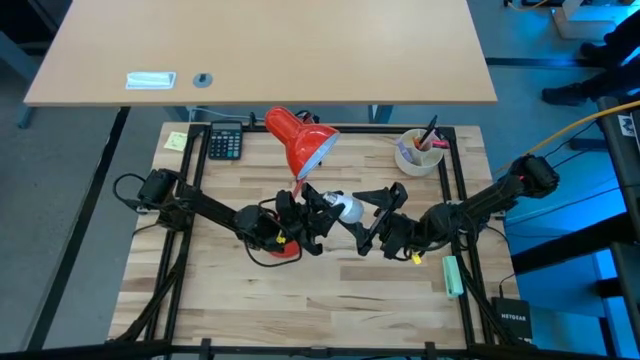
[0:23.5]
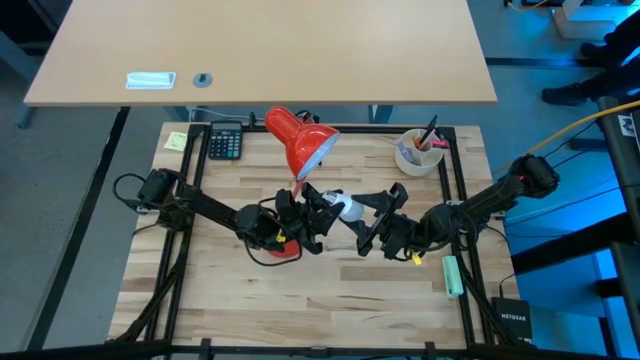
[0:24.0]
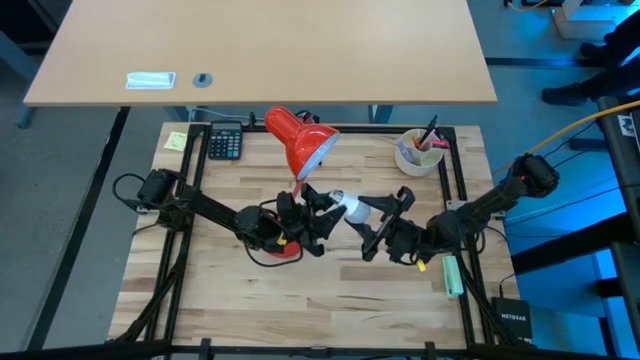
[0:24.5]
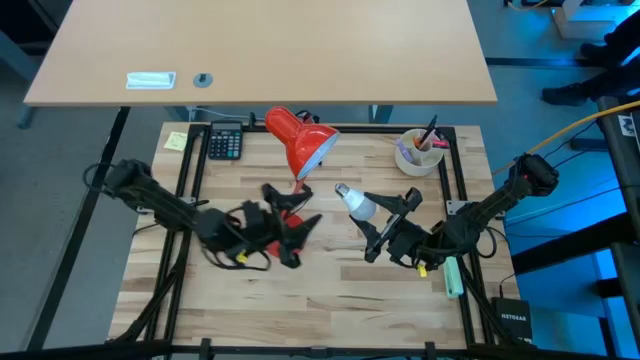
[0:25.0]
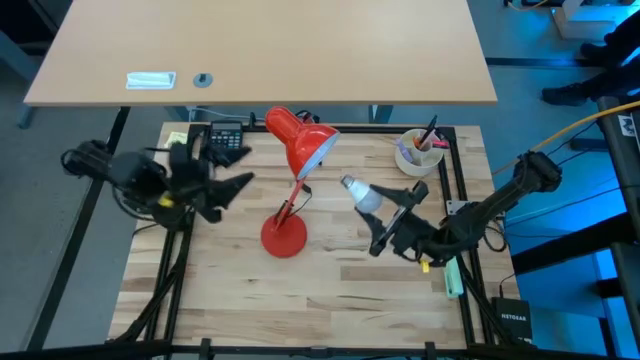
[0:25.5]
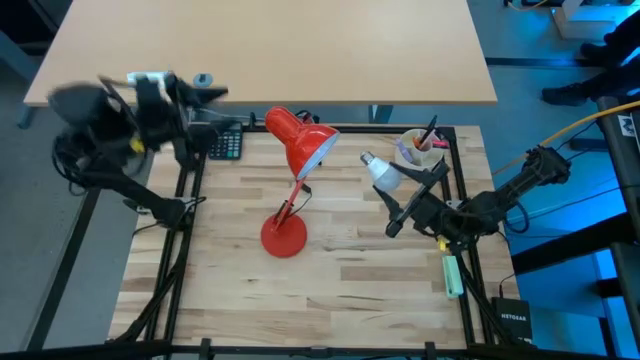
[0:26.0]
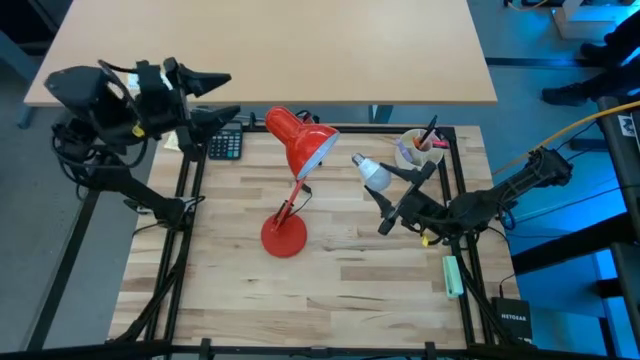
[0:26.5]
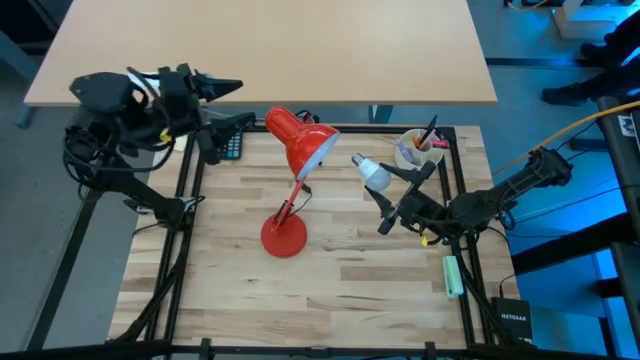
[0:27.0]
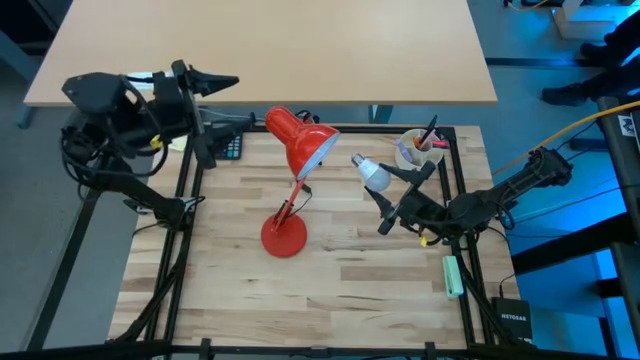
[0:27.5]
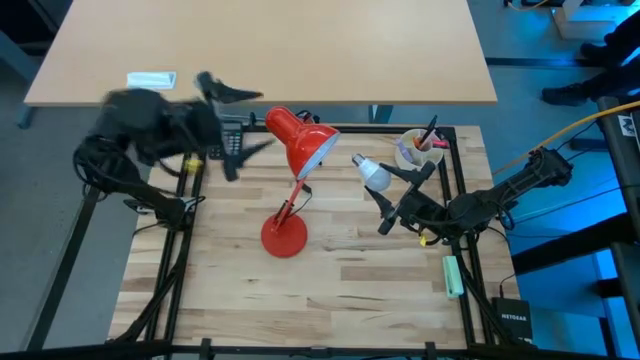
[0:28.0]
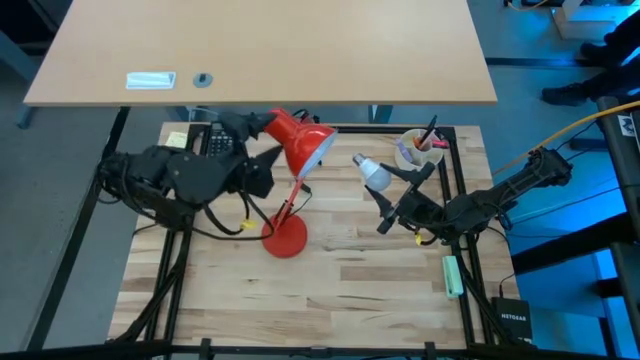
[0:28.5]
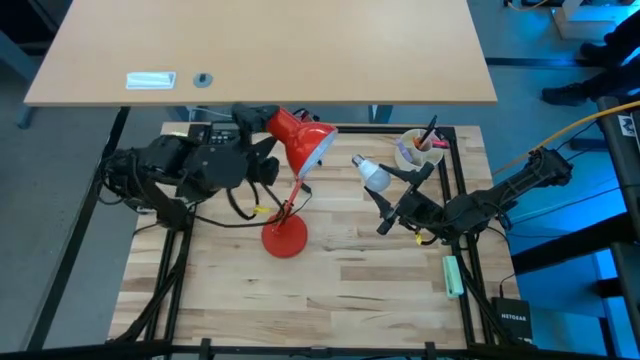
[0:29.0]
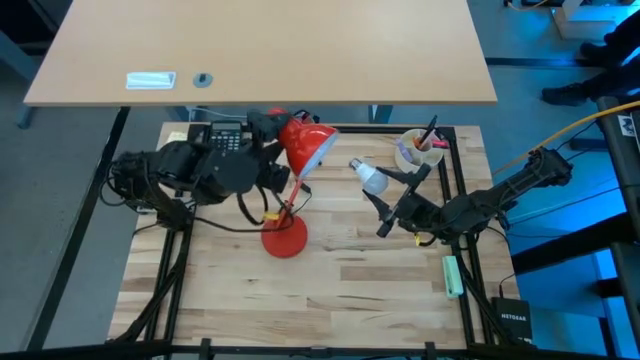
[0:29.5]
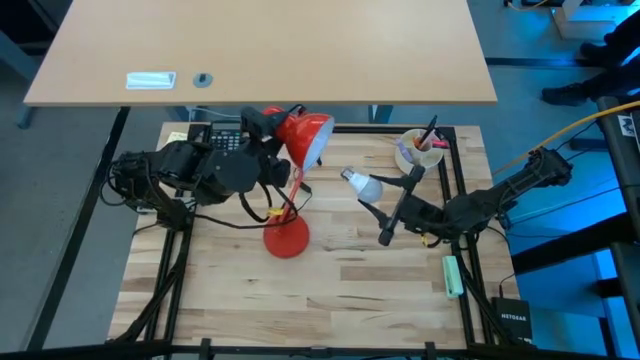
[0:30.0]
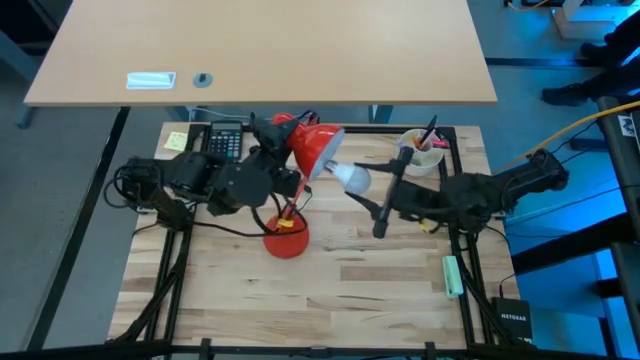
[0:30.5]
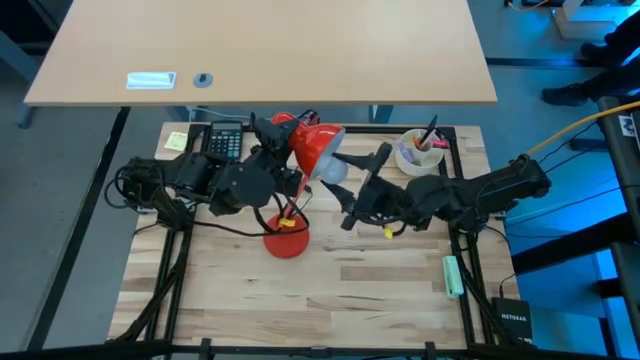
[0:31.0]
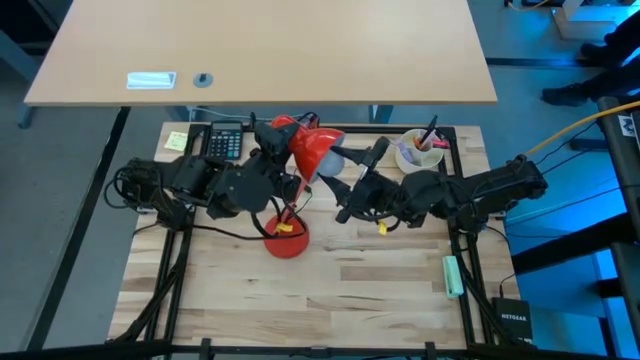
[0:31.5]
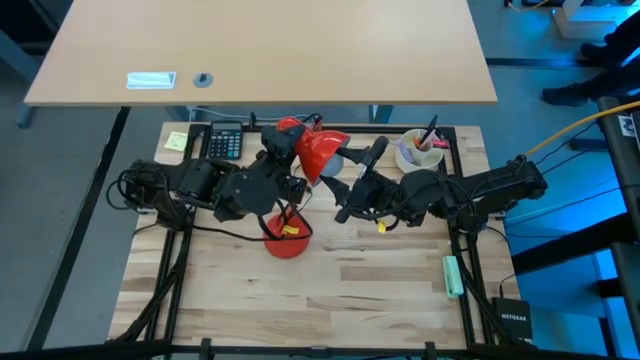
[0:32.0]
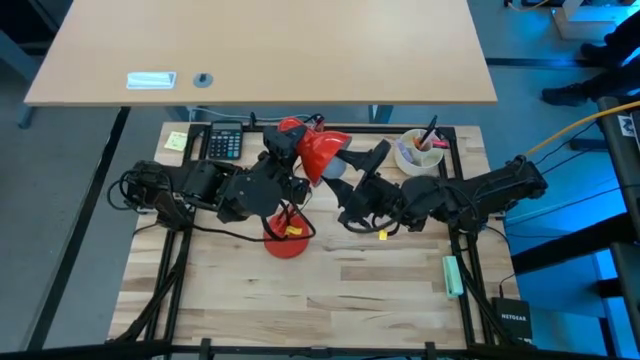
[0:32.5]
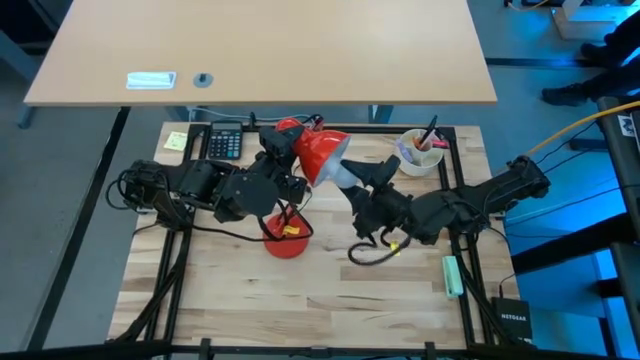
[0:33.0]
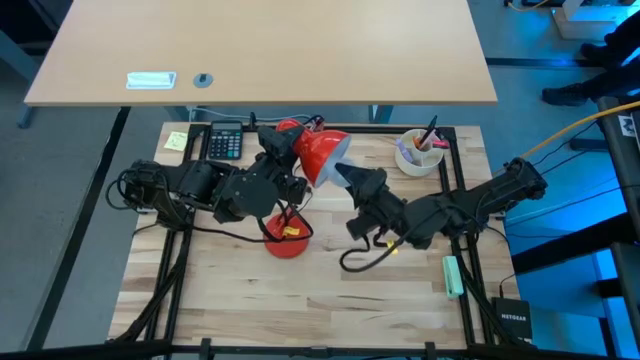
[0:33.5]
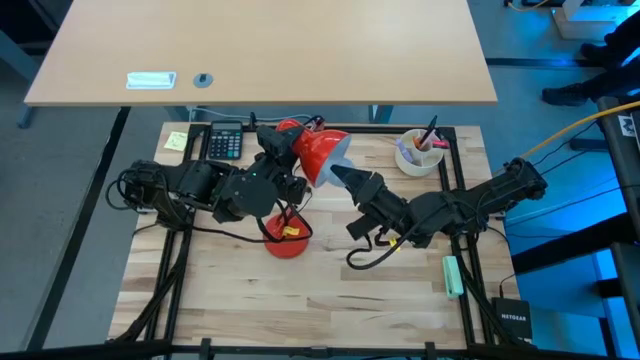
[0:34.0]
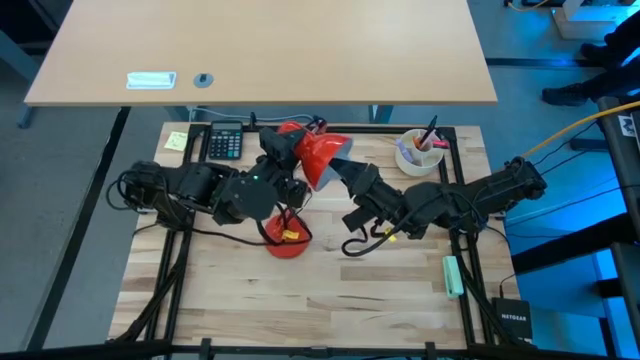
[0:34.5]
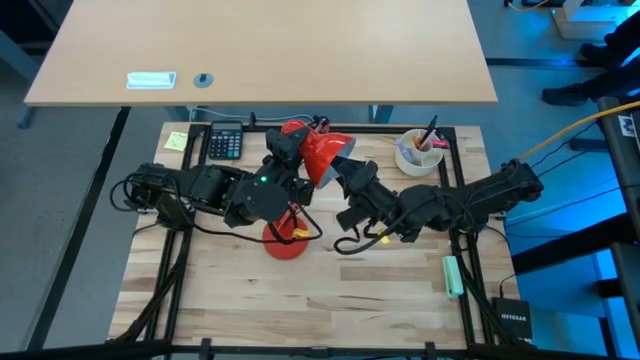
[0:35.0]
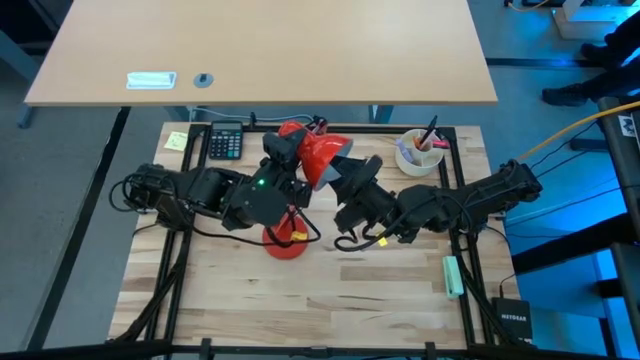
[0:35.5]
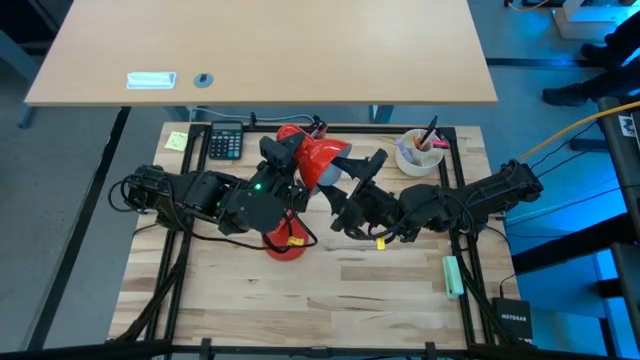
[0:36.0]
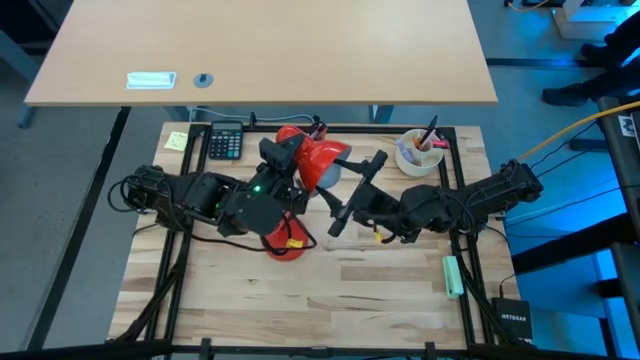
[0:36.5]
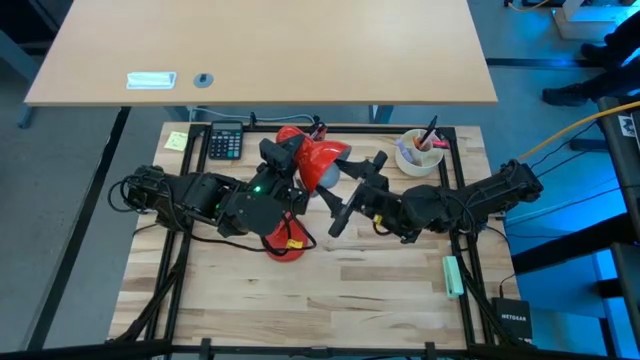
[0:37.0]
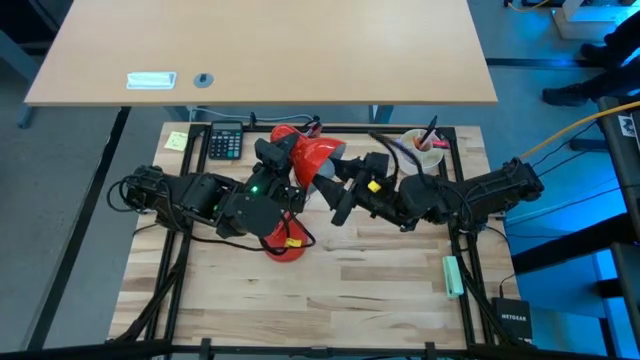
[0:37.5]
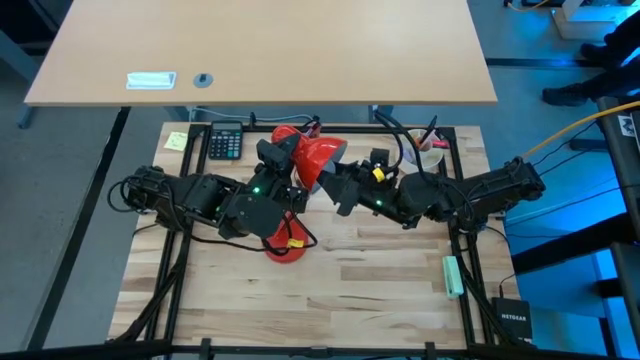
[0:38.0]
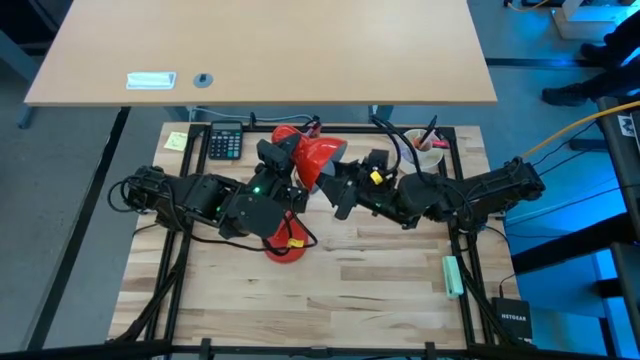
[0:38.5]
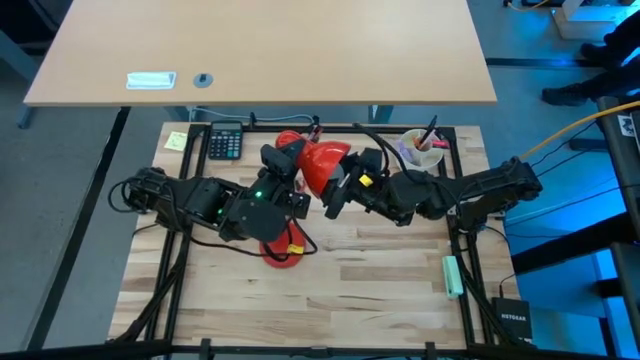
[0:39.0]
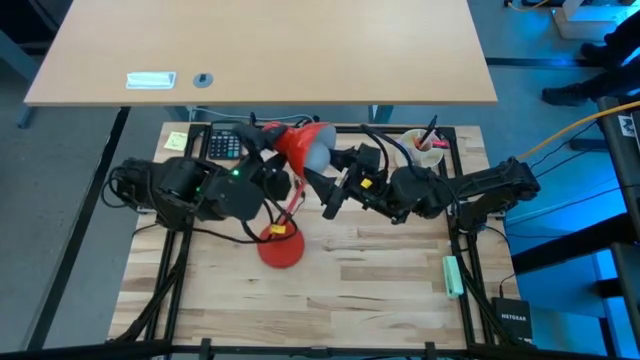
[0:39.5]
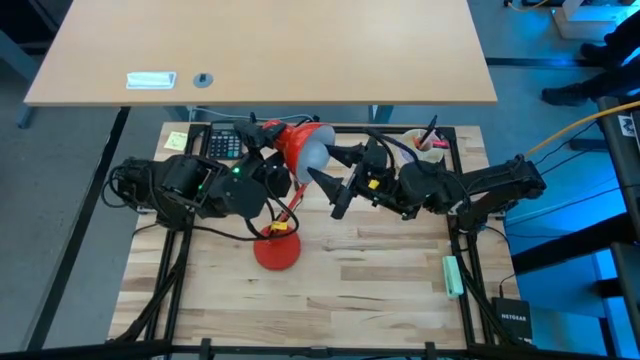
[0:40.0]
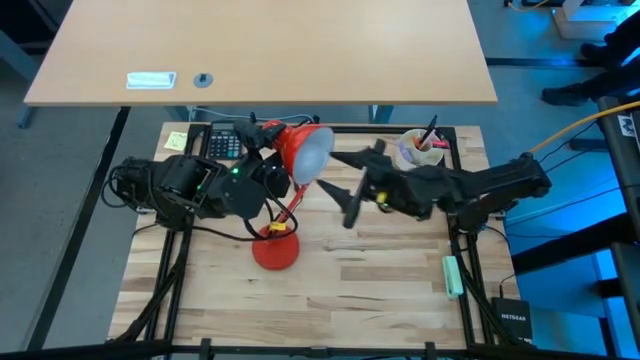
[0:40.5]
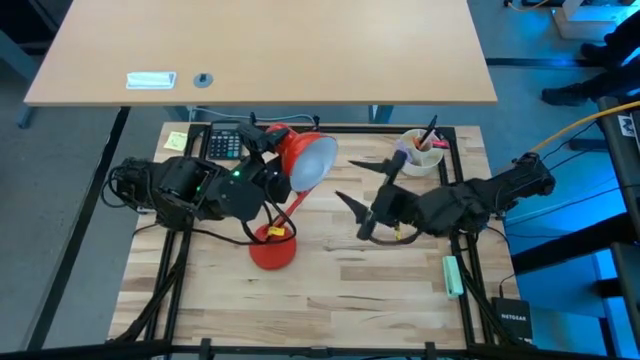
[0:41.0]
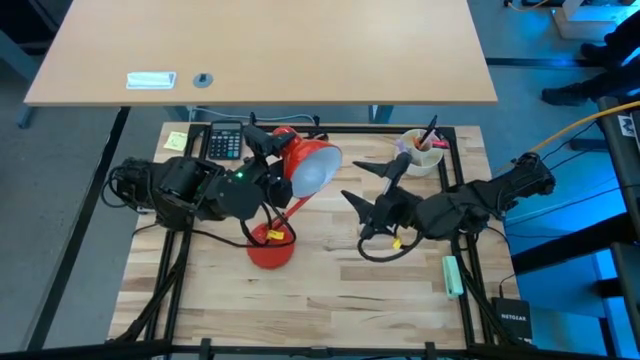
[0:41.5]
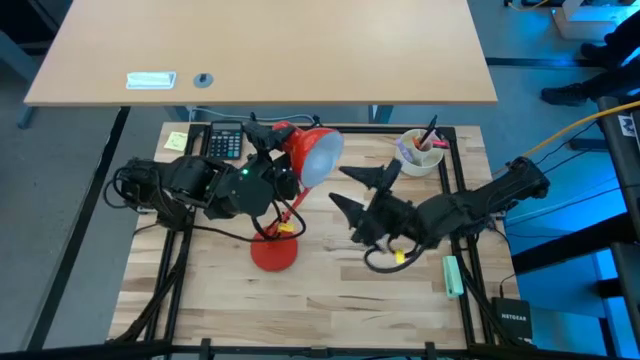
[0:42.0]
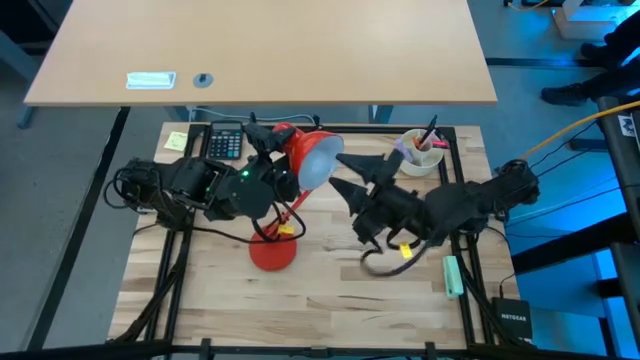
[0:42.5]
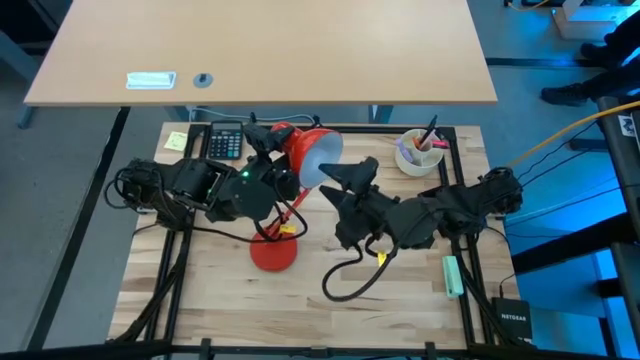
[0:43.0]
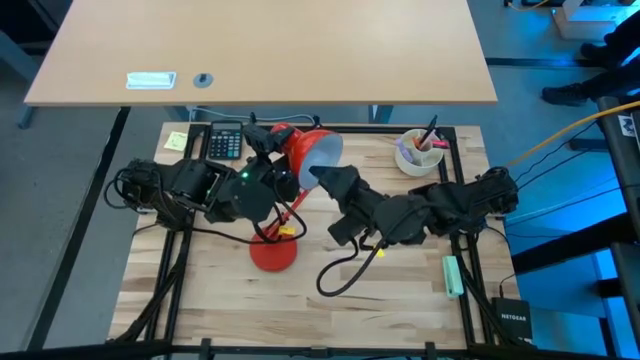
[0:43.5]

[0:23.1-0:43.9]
Task: Screw lightbulb
Insert the light bulb into the lamp
